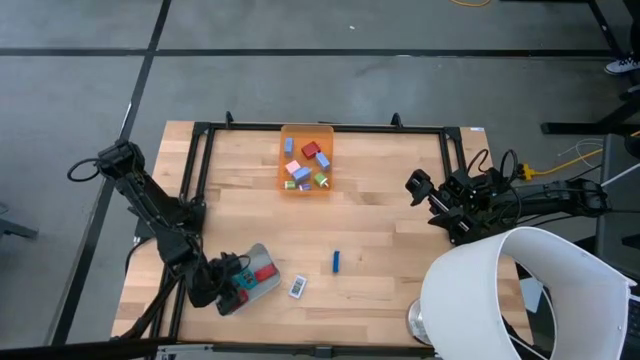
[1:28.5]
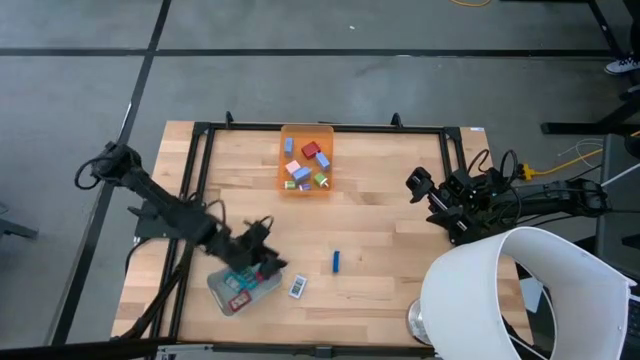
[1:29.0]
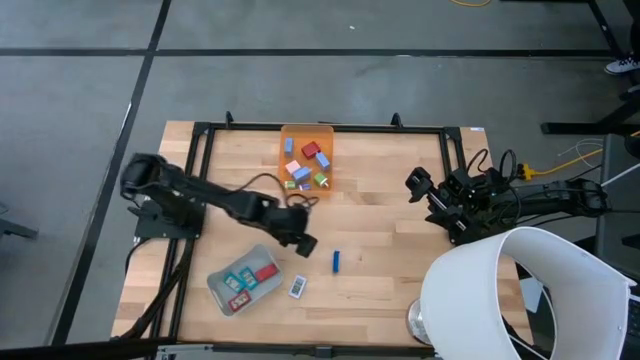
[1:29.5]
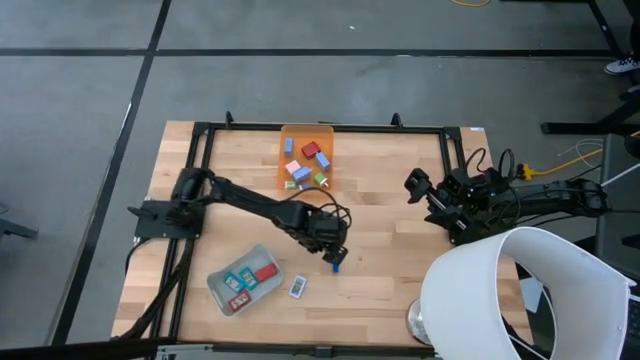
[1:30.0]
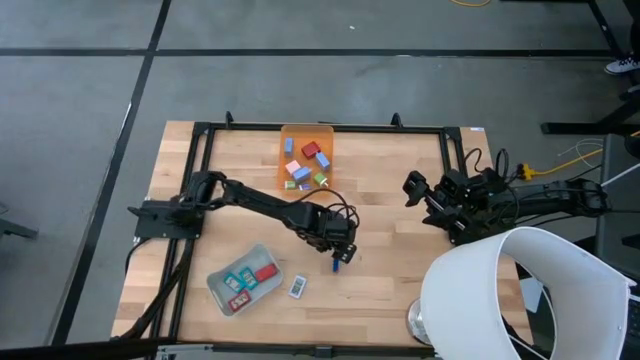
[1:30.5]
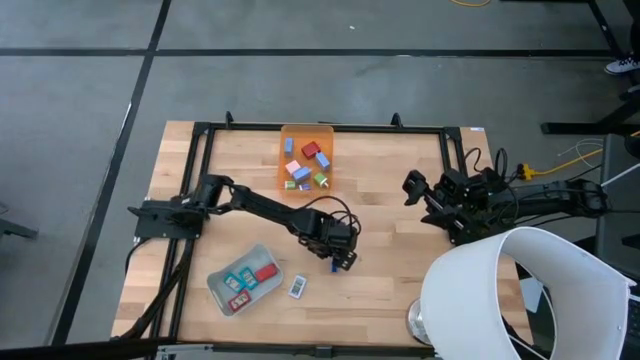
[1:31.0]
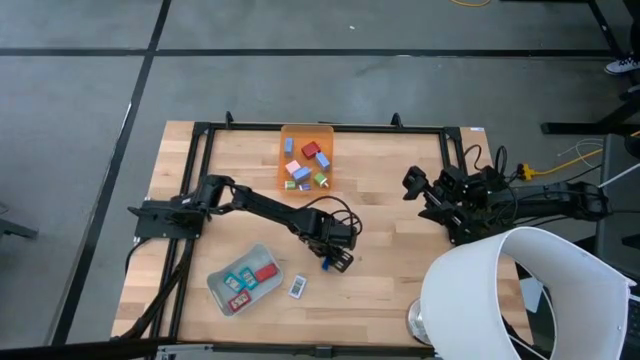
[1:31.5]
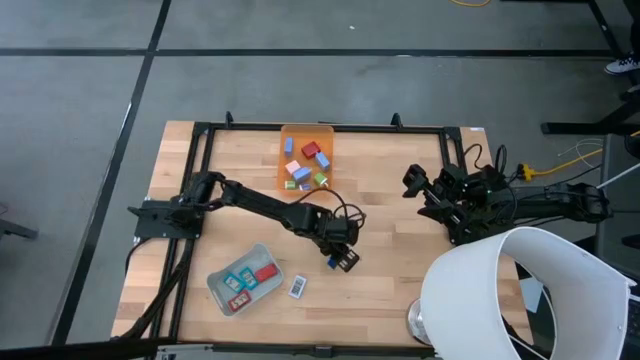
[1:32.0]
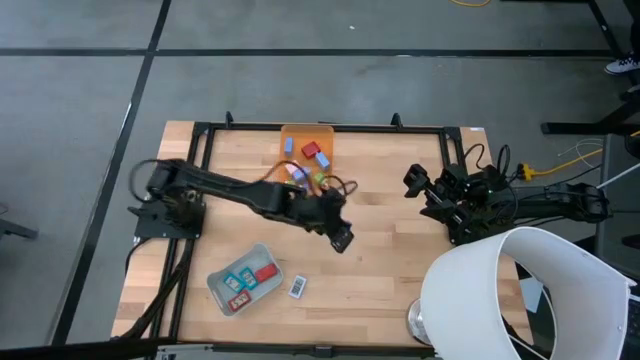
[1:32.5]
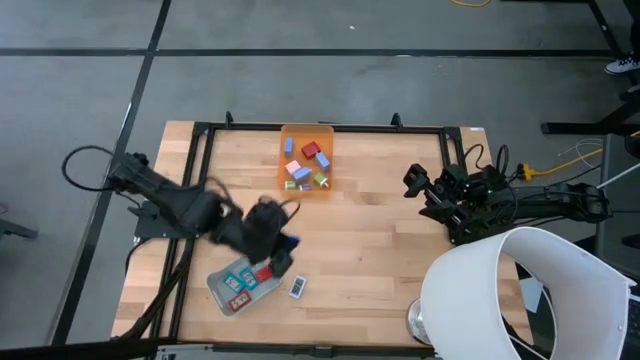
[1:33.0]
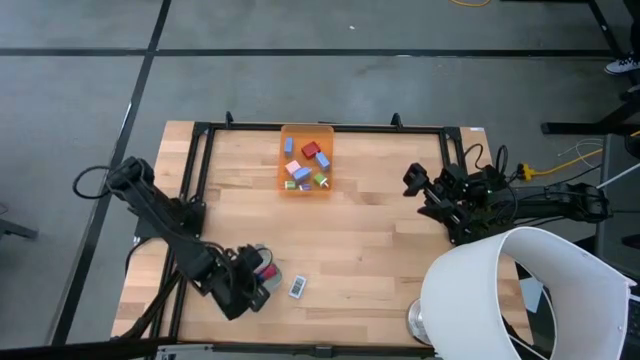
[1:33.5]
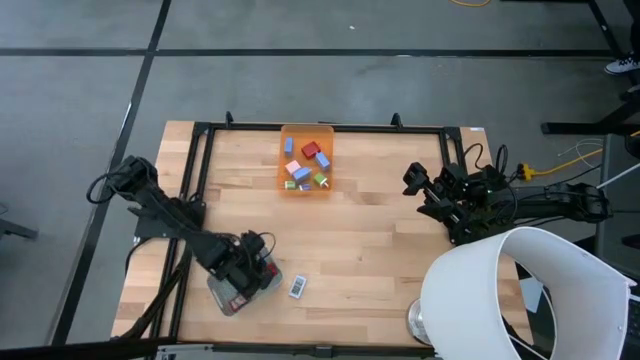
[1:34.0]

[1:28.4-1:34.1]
Task: Pick & Place Office items
Put the dark blue digital clock into the gray bin

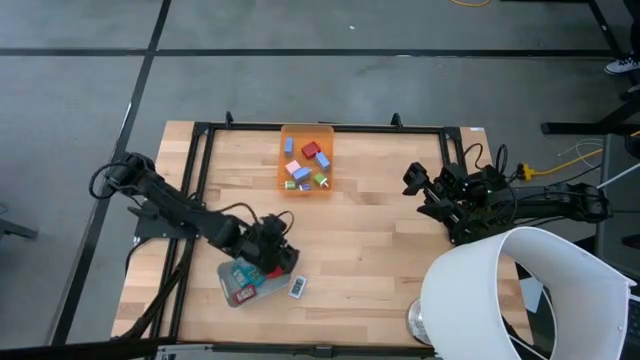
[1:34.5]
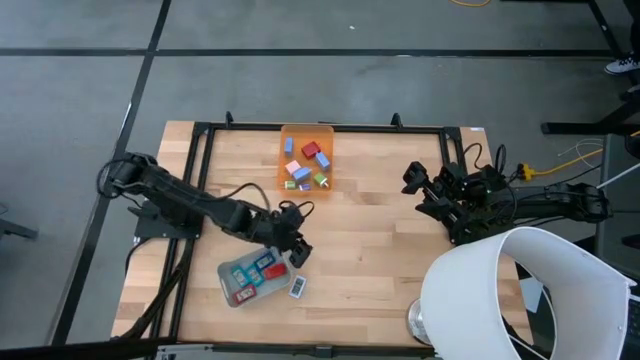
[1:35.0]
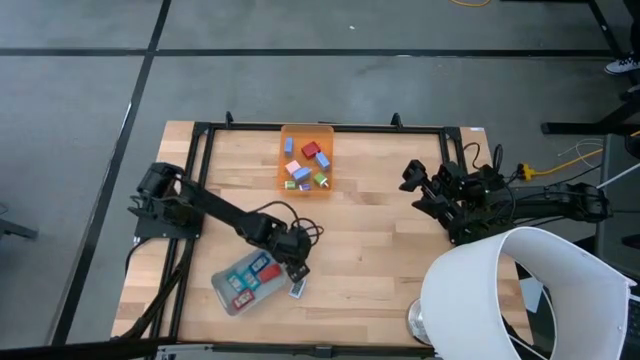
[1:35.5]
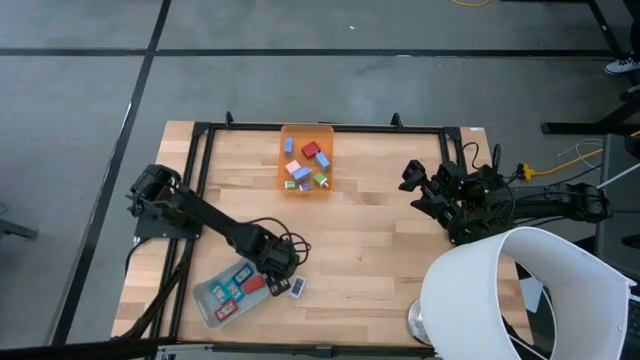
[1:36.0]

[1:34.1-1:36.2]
Adjust the gray bin

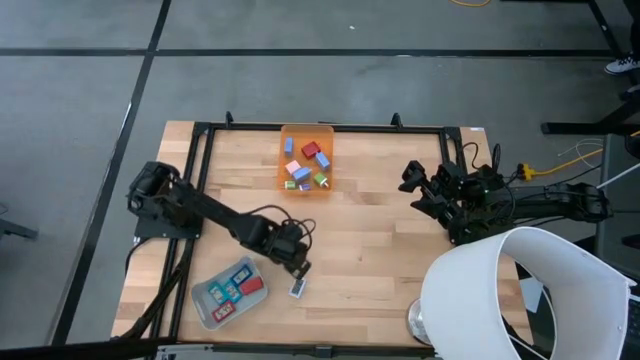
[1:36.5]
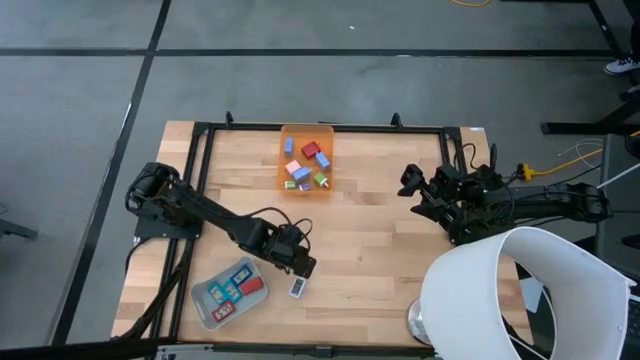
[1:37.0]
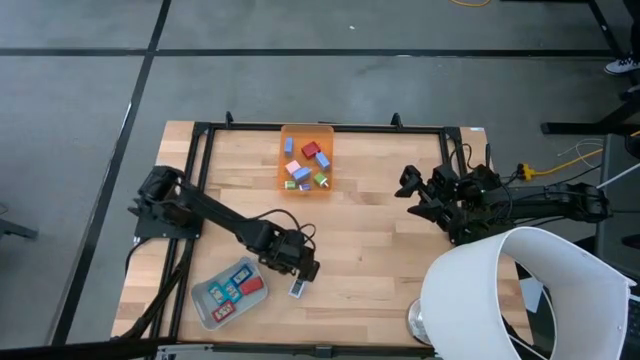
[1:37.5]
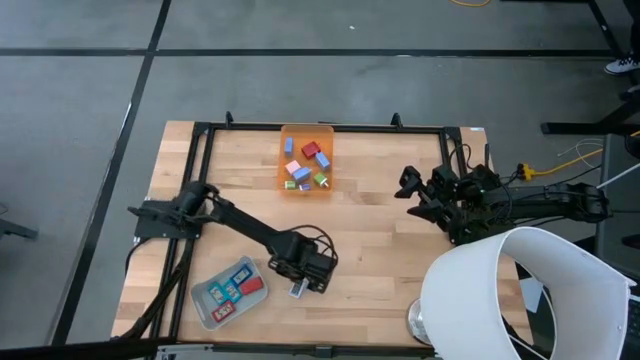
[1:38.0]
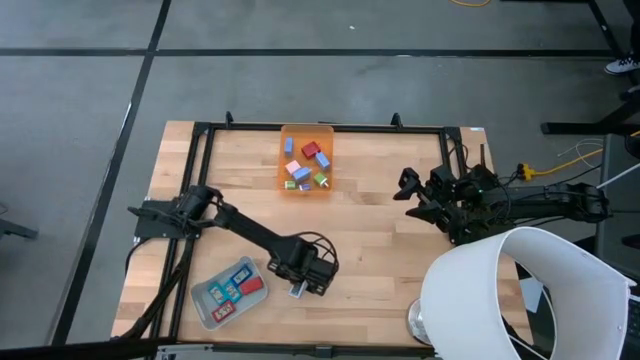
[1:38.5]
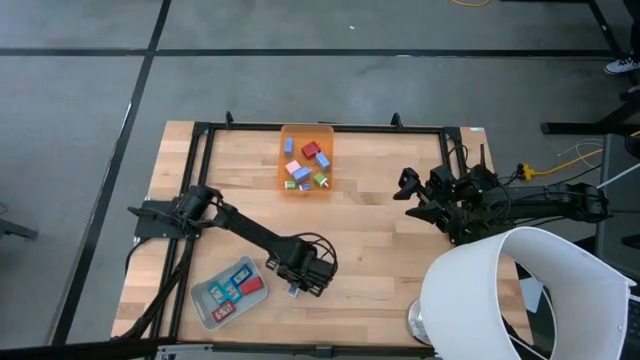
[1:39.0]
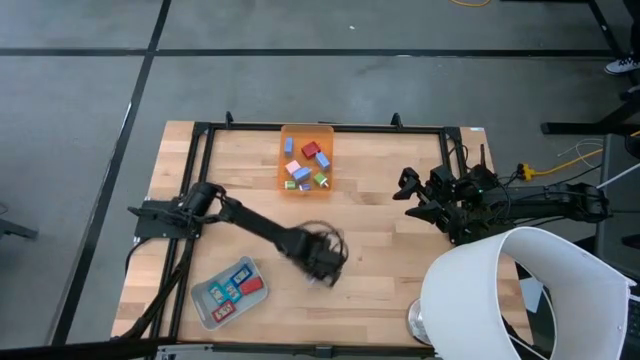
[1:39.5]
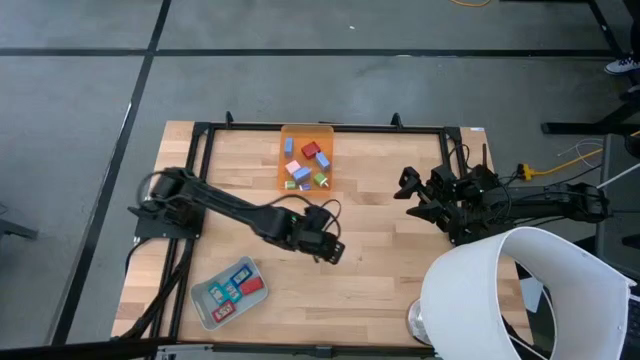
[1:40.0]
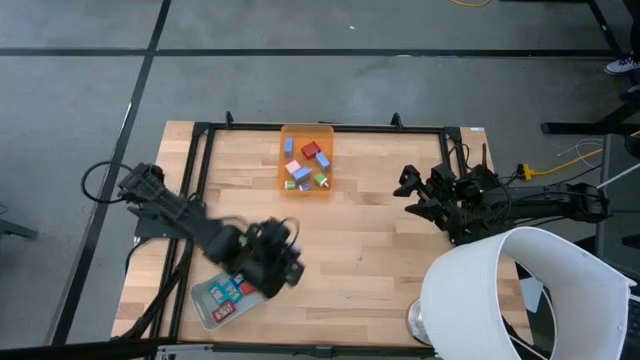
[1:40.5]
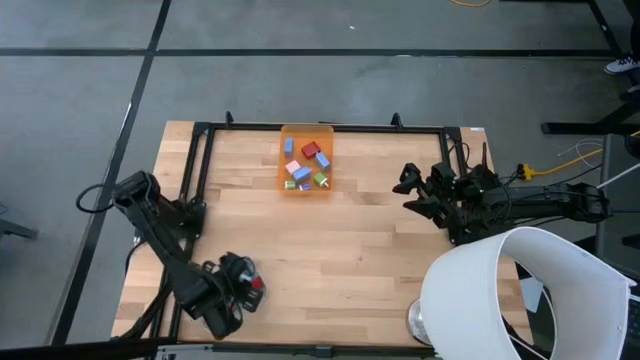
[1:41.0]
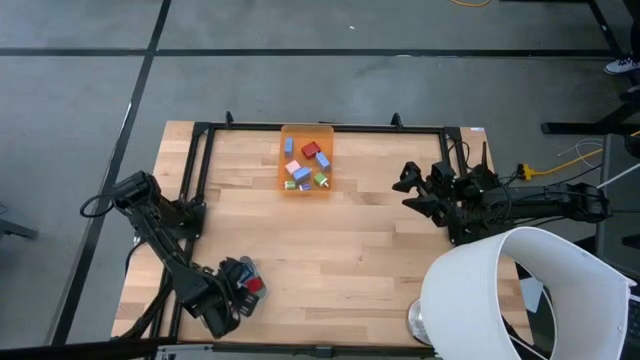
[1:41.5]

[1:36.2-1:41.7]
Put the white digital clock into the gray bin

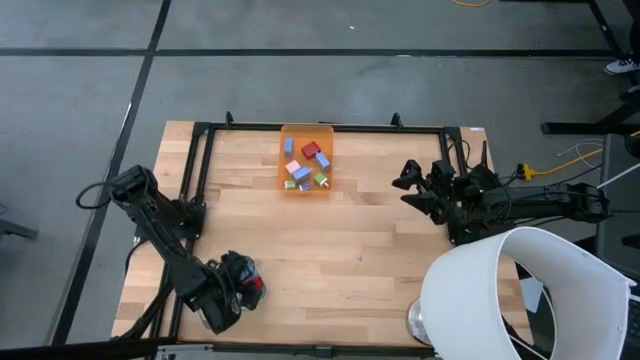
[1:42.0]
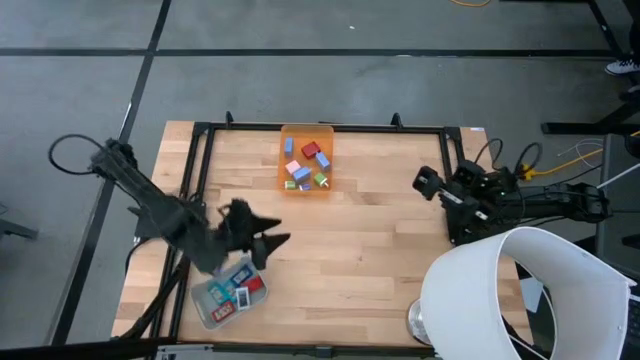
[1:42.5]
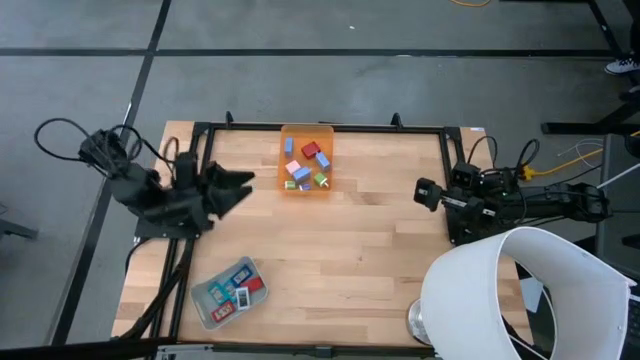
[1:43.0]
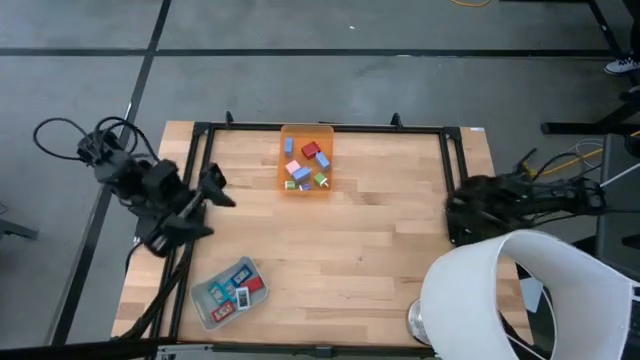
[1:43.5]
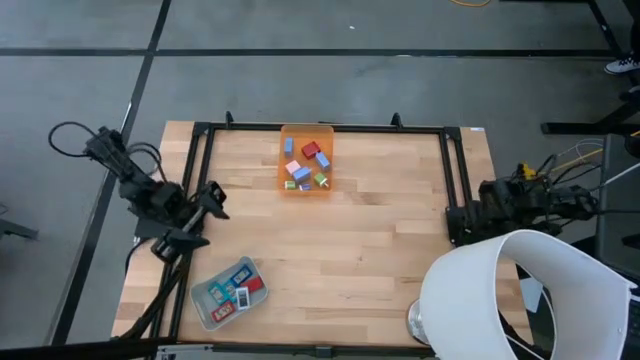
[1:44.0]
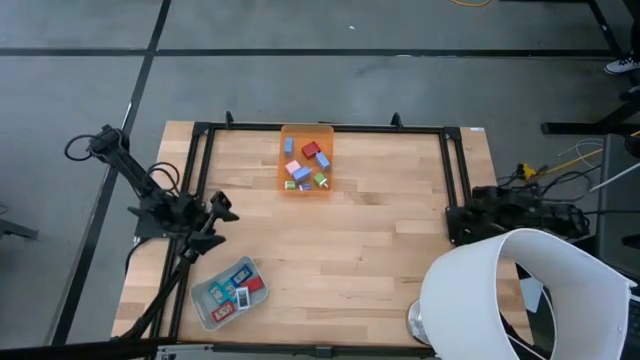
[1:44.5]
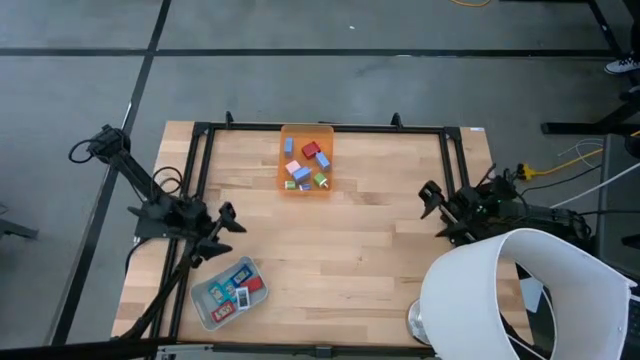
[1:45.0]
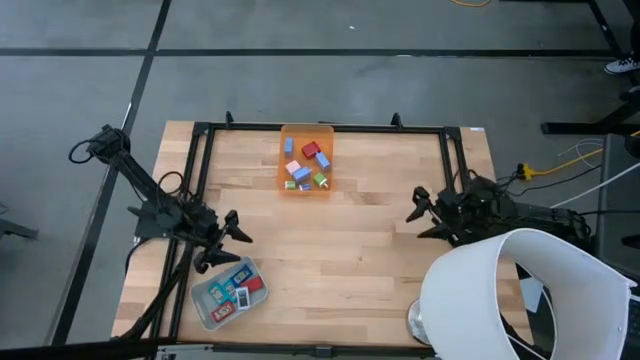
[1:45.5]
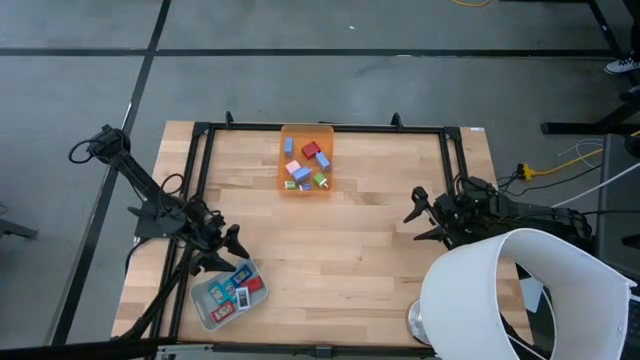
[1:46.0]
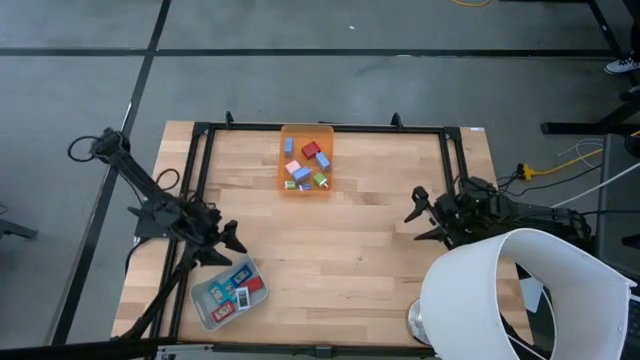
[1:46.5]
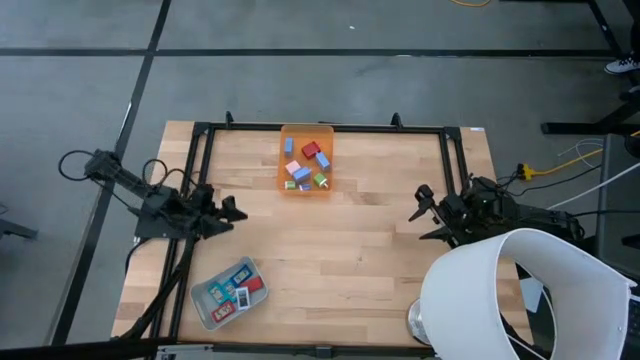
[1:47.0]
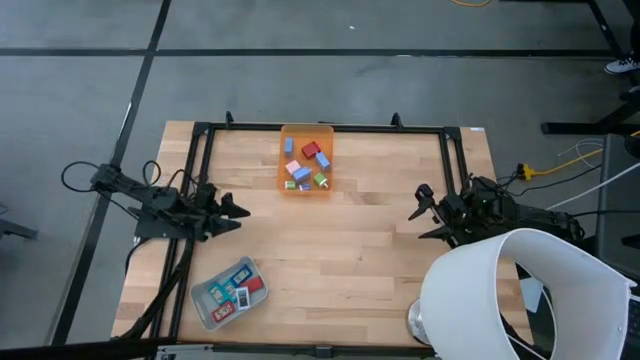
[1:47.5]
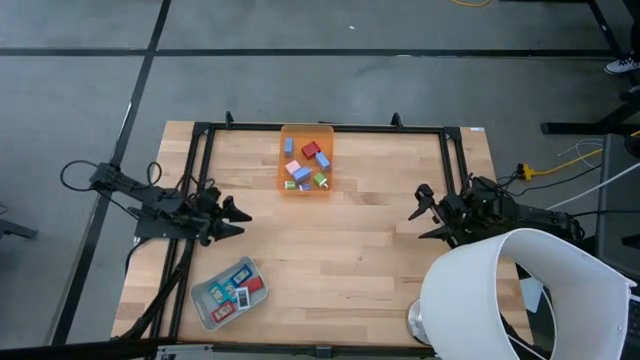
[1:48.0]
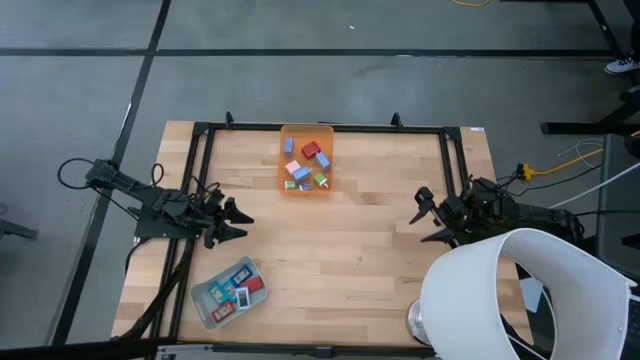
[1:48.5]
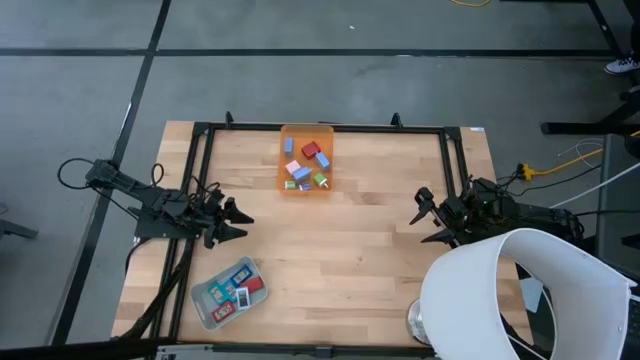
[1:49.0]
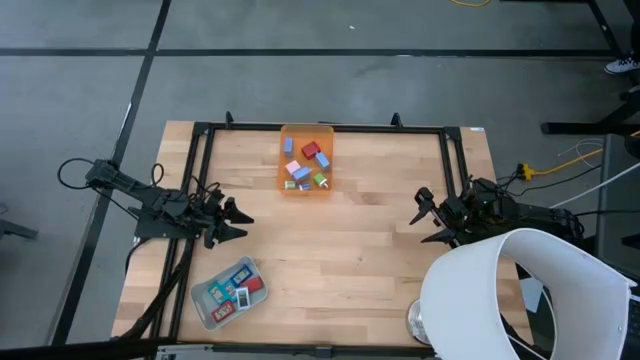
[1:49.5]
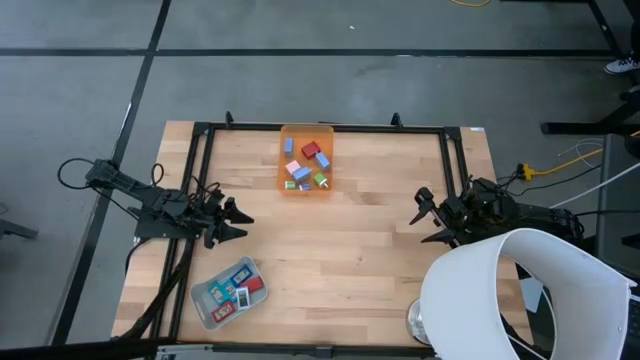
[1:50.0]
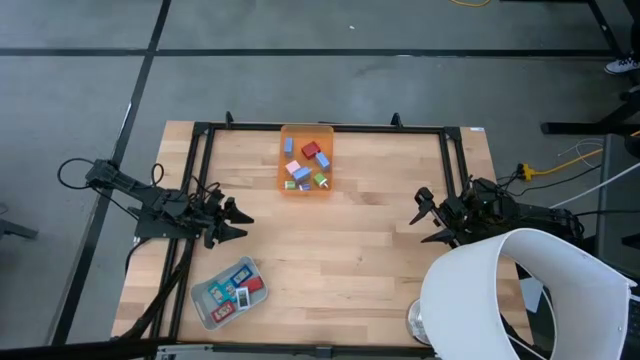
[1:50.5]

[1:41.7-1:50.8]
Return to Home Position
